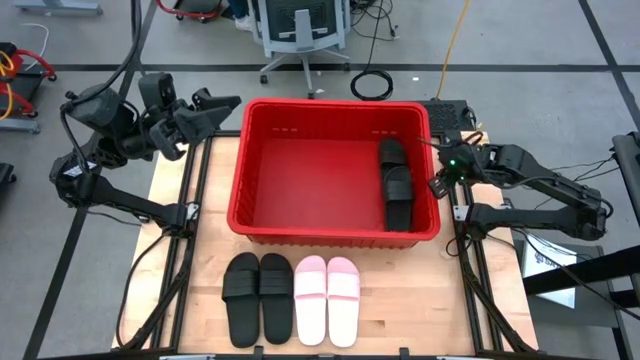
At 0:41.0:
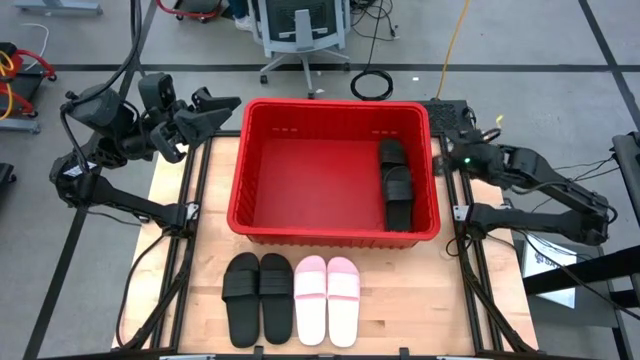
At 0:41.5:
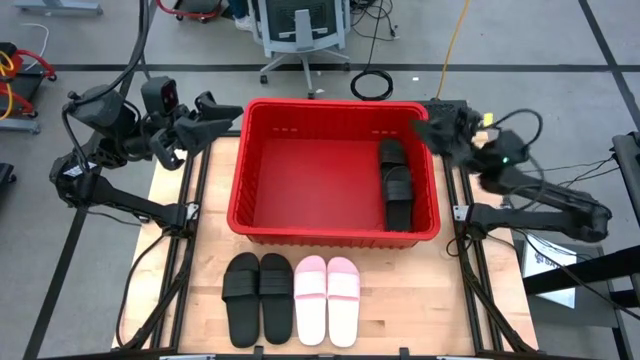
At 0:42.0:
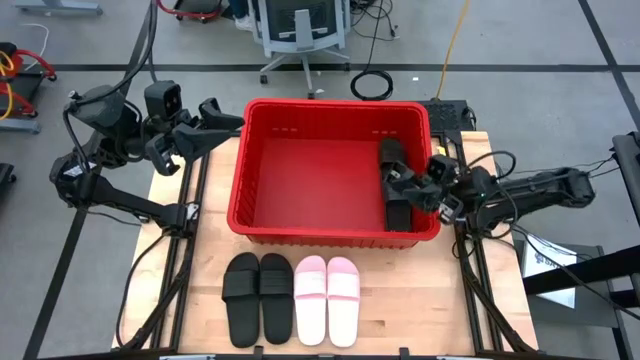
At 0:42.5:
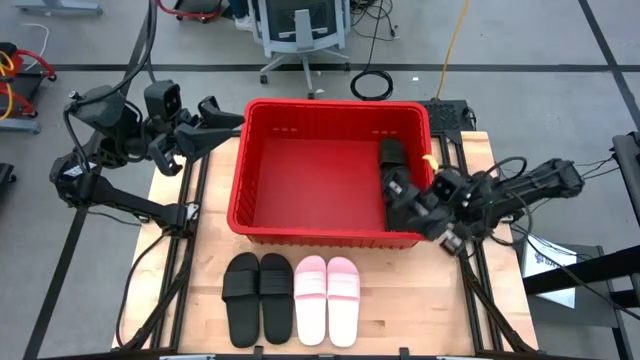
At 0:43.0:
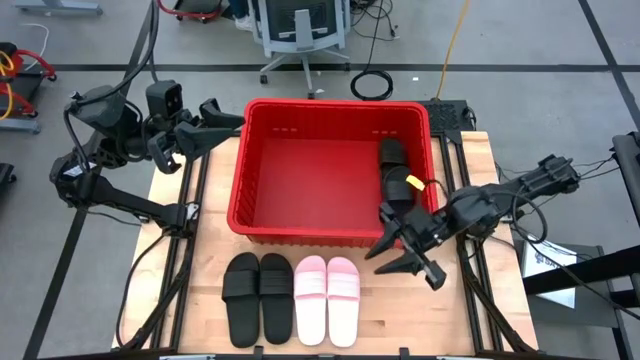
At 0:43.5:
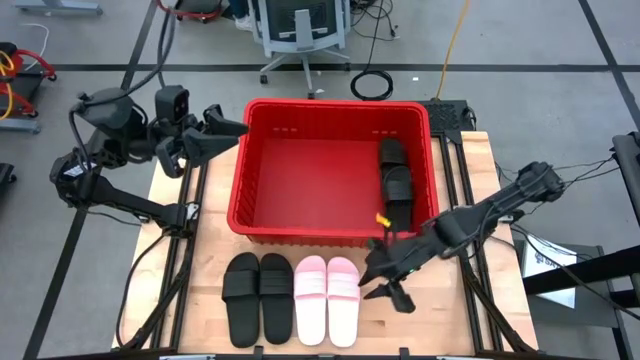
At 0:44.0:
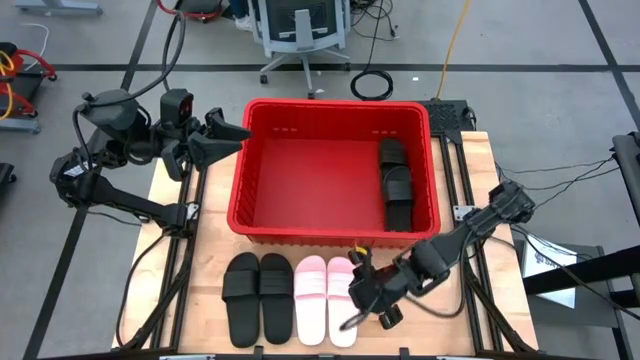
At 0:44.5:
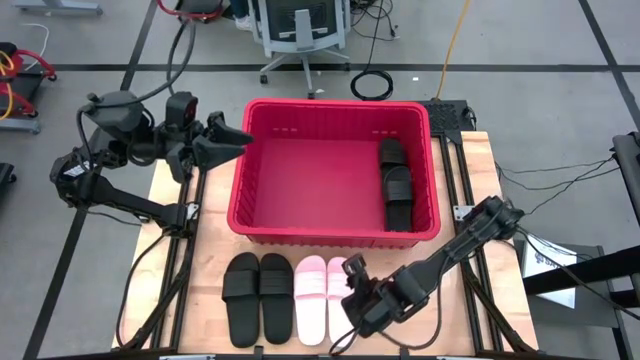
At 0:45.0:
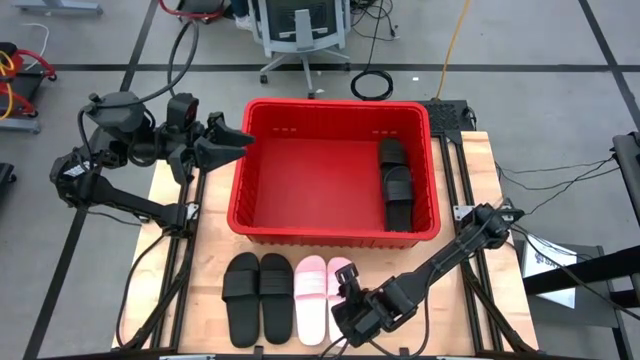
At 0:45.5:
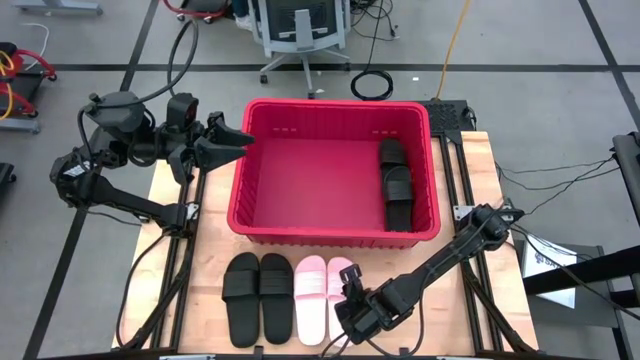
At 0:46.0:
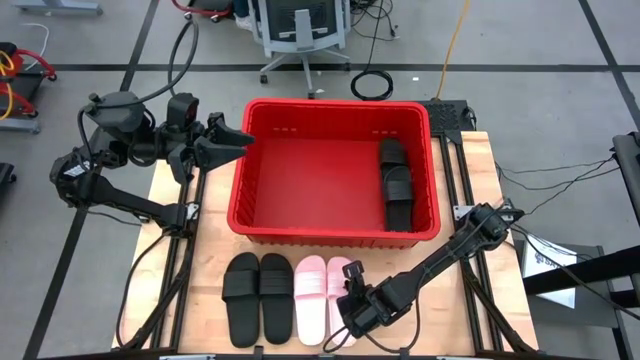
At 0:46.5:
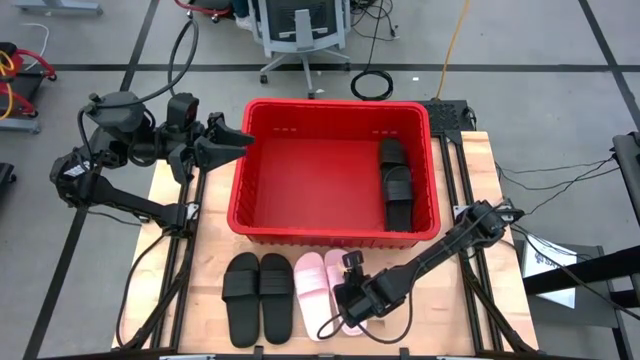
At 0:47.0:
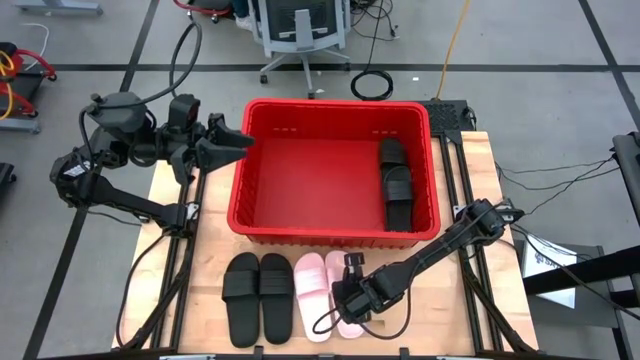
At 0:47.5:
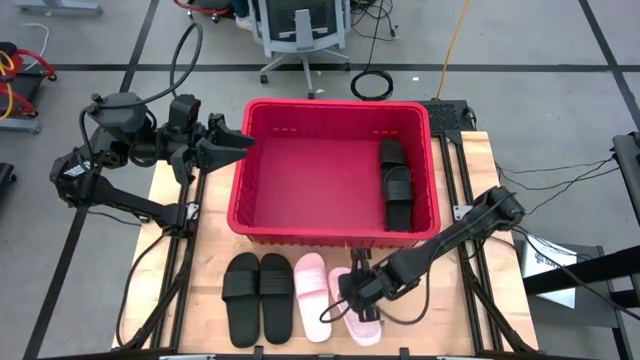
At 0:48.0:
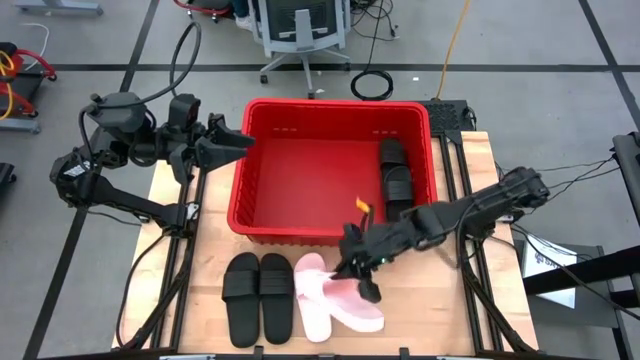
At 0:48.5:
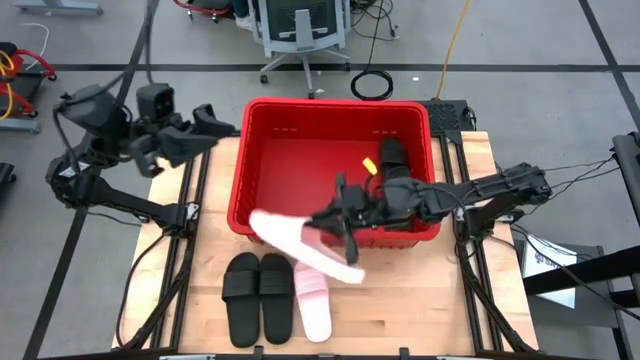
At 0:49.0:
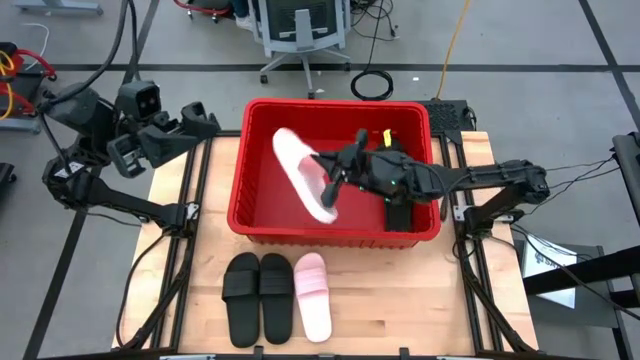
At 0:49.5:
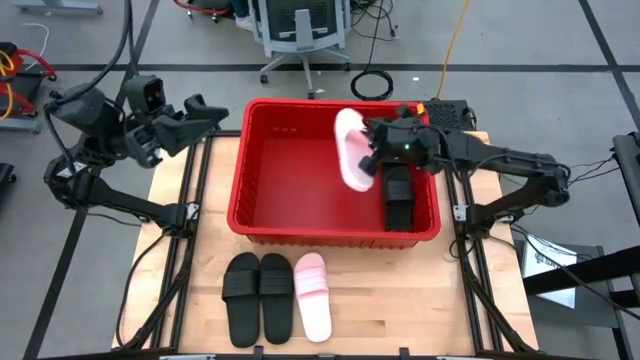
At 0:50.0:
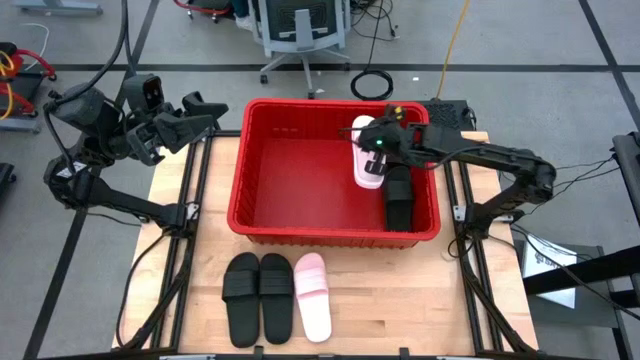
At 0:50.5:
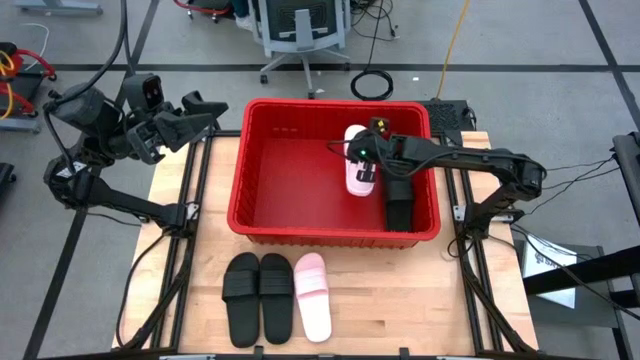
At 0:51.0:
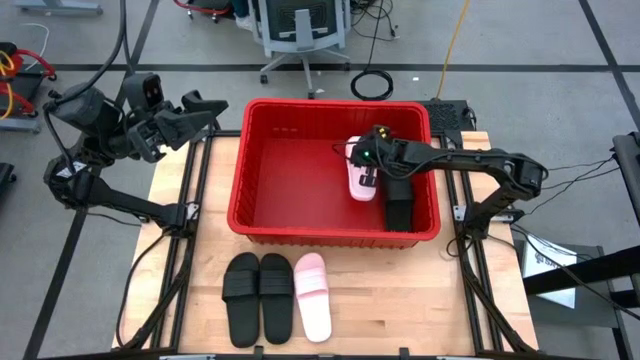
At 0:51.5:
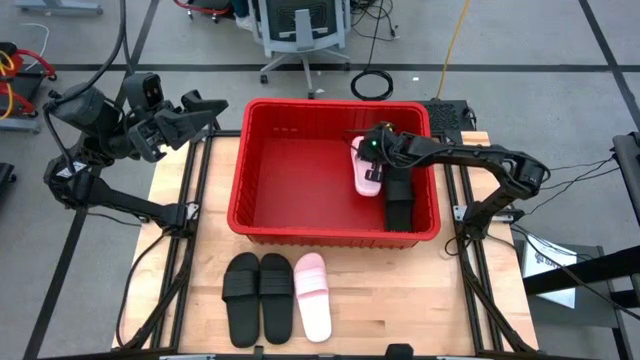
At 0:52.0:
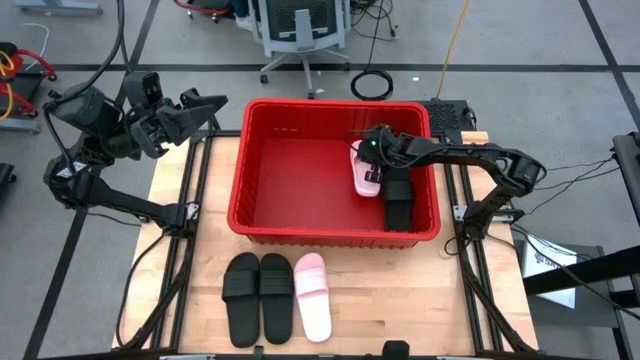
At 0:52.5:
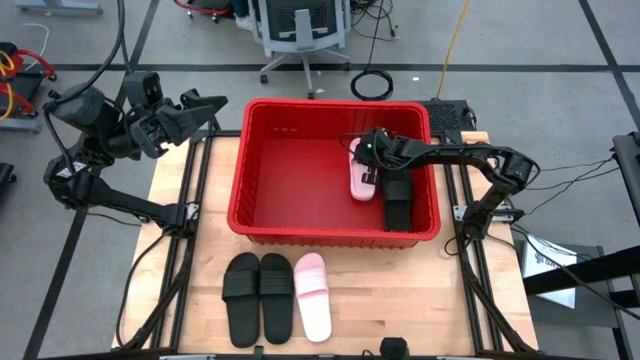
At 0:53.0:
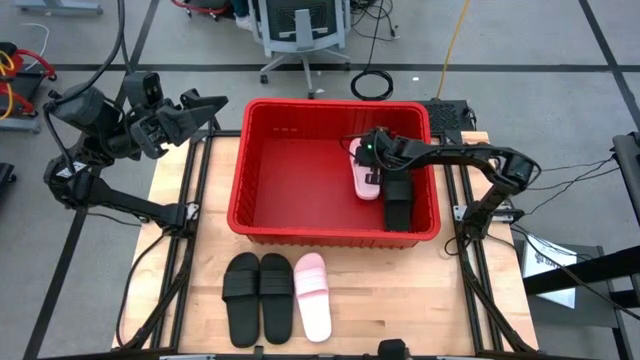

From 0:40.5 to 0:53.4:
Task: Pick and place slides into bin
Put the pink slide into the red bin

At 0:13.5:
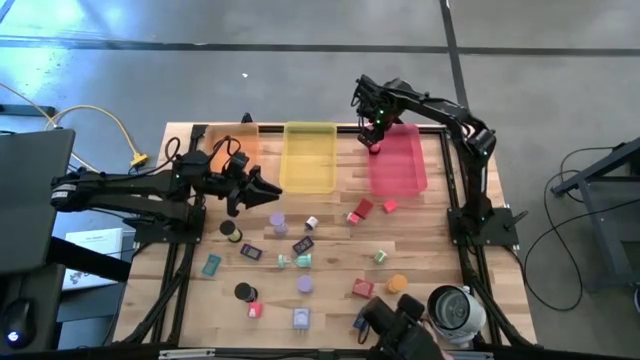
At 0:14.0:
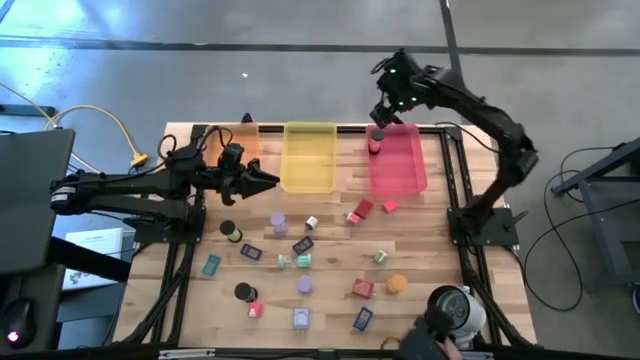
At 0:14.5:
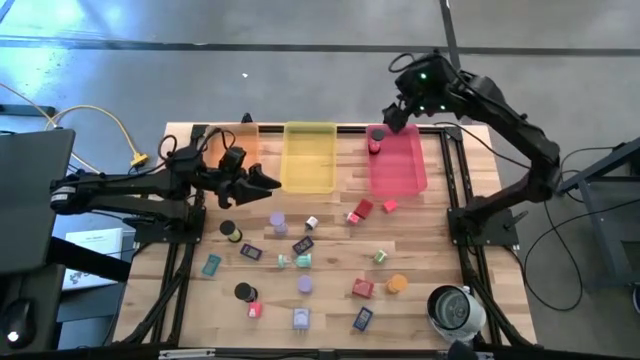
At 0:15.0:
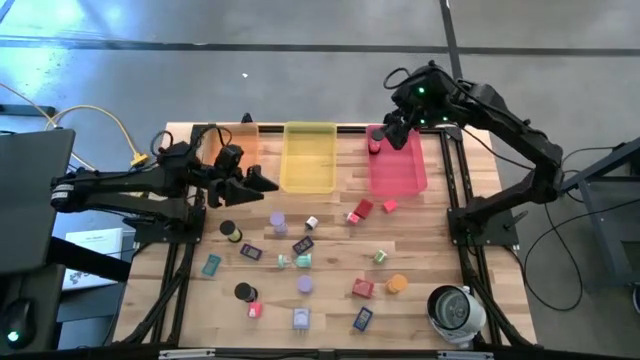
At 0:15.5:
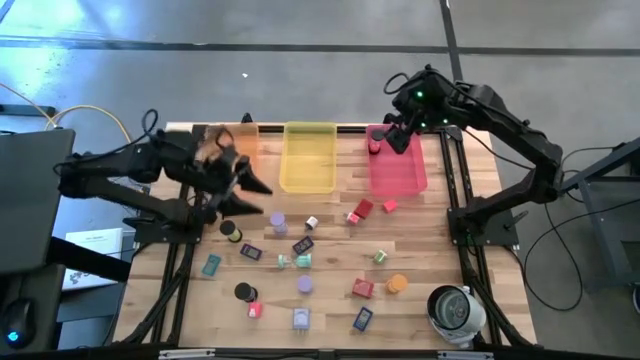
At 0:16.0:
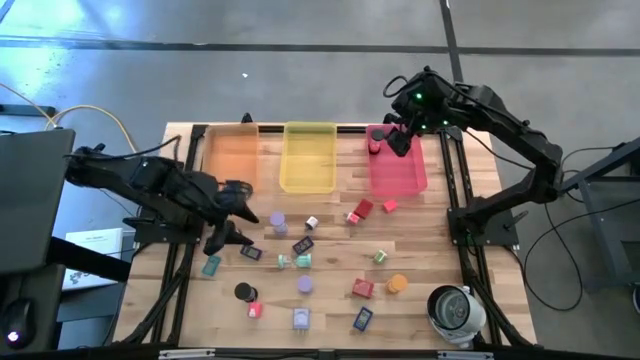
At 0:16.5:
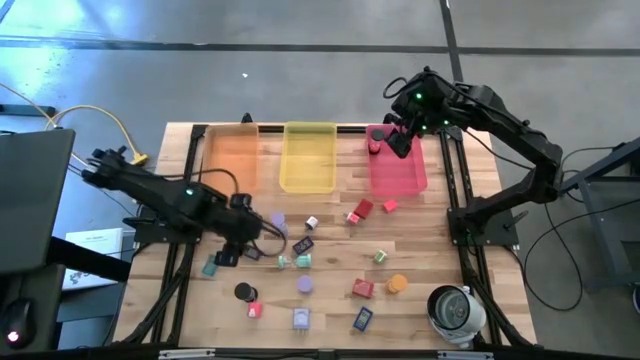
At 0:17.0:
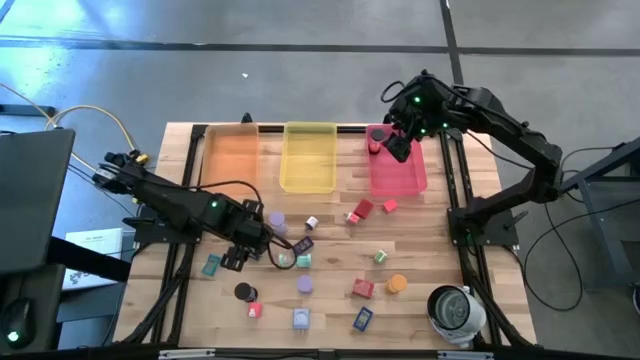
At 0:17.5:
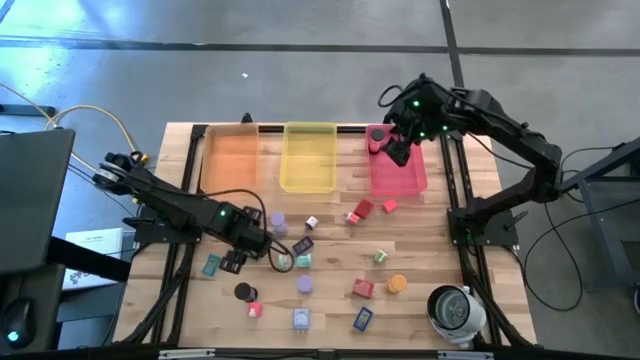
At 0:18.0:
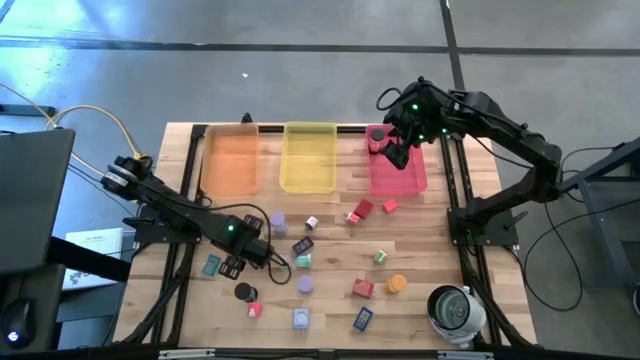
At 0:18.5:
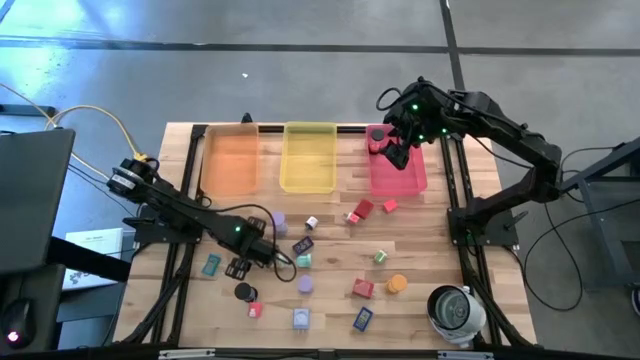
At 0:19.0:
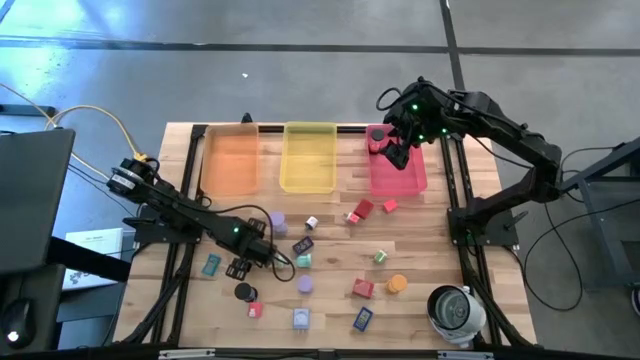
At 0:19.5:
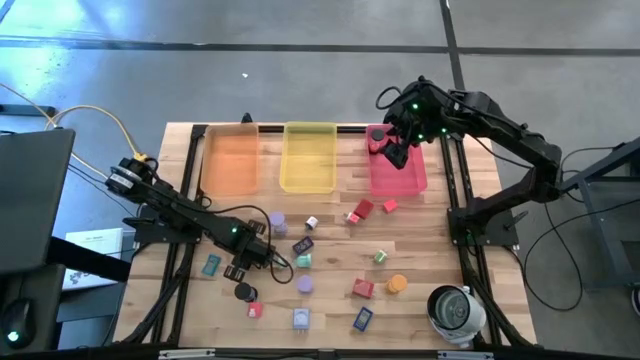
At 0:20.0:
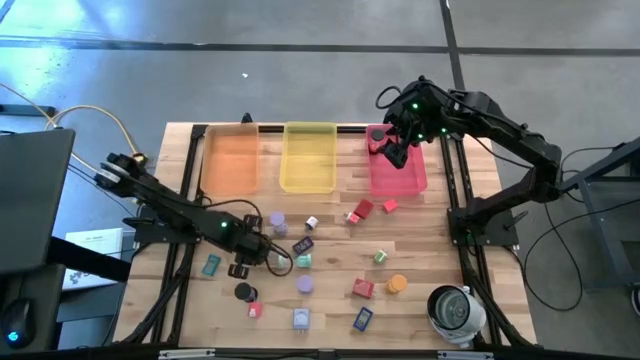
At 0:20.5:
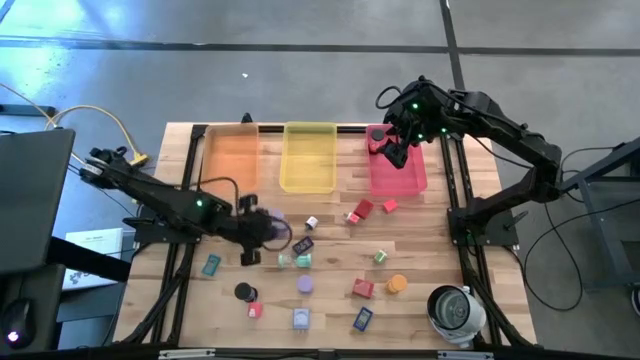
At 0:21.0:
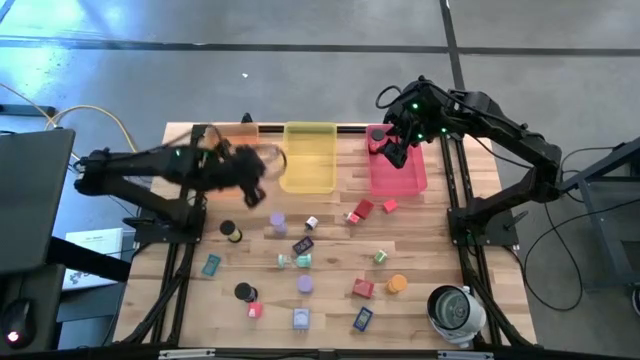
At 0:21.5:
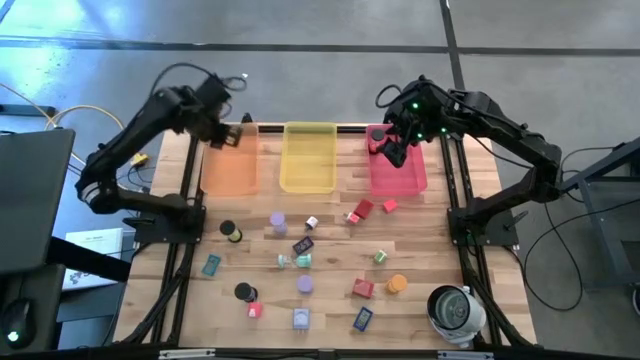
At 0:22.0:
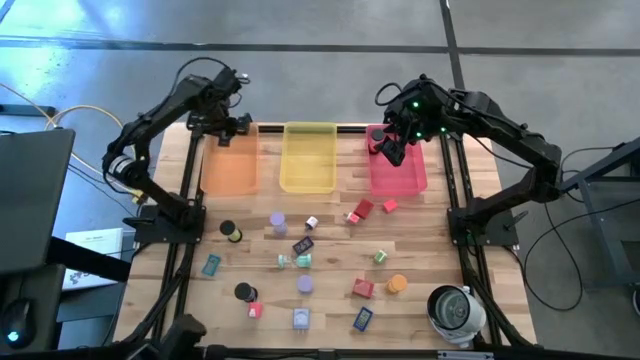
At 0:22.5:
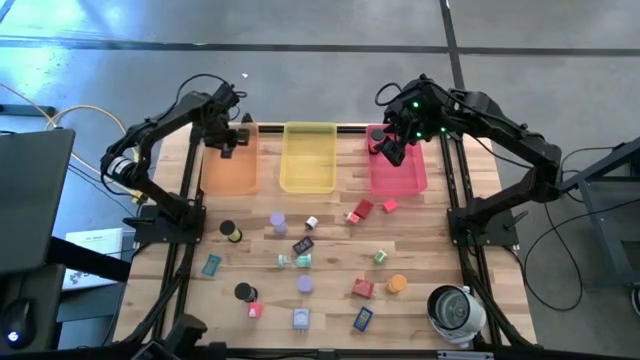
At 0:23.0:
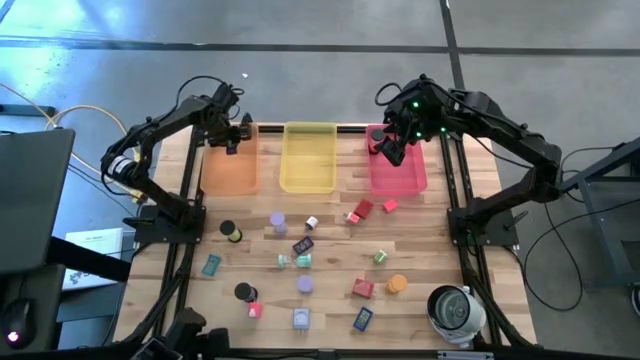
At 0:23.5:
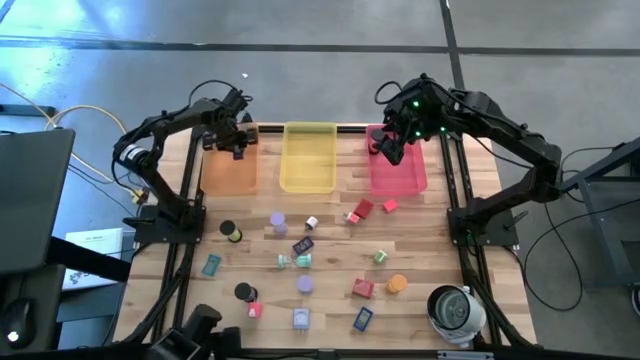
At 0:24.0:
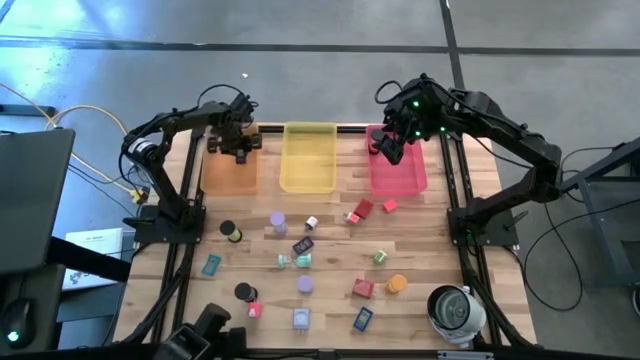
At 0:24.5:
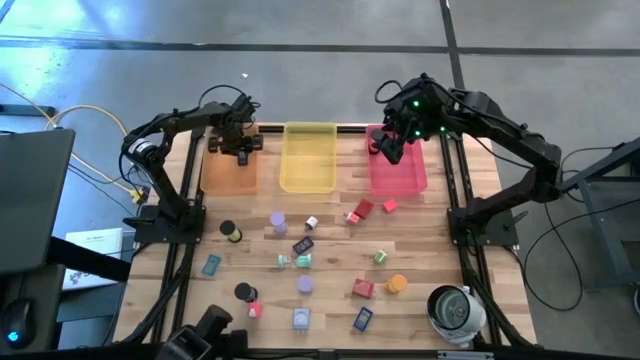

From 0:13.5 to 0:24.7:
Task: Pick & Place Office items
Put the left blue digital clock into the orange bin
